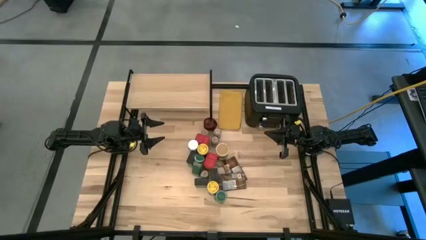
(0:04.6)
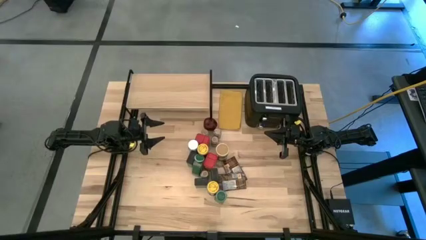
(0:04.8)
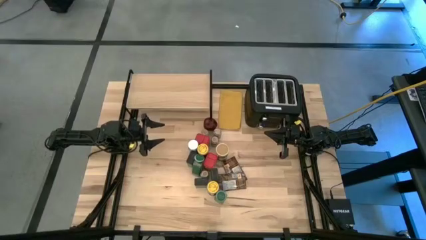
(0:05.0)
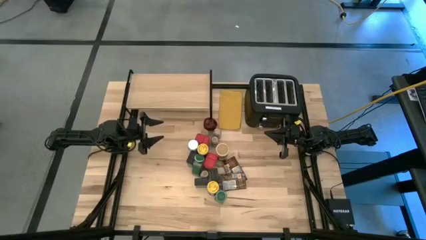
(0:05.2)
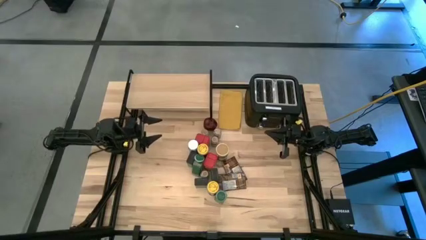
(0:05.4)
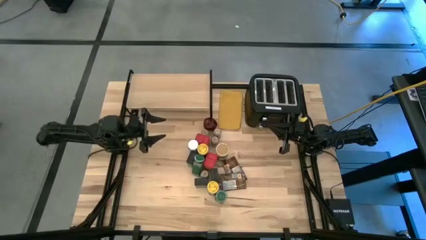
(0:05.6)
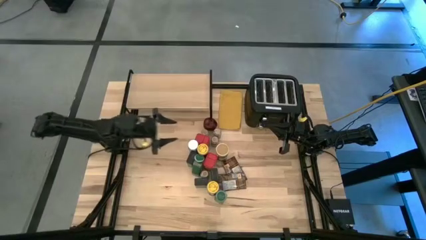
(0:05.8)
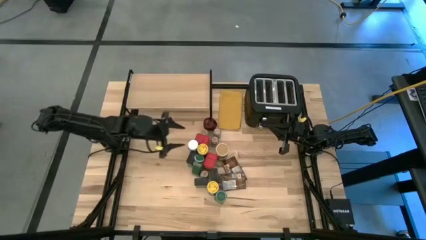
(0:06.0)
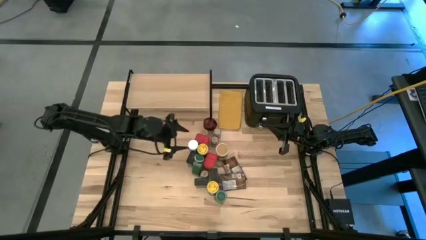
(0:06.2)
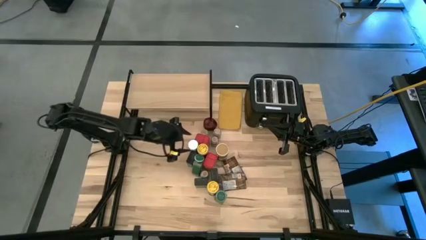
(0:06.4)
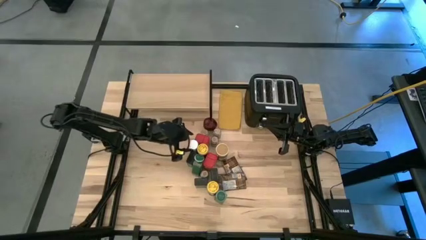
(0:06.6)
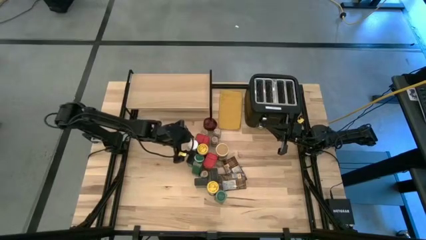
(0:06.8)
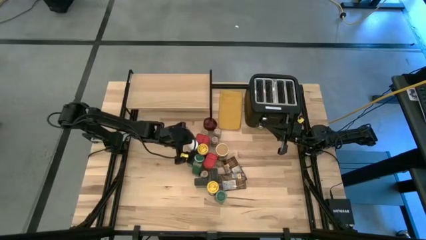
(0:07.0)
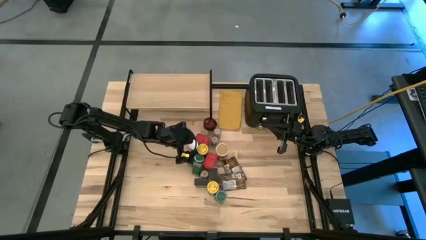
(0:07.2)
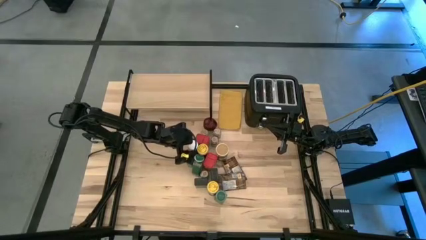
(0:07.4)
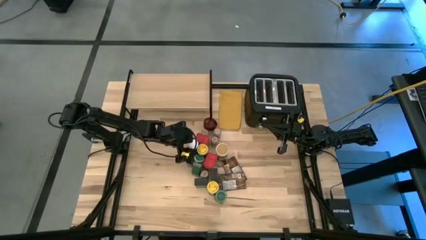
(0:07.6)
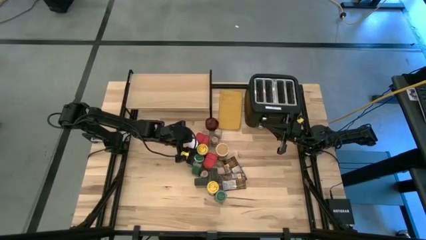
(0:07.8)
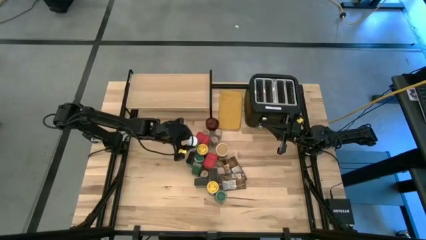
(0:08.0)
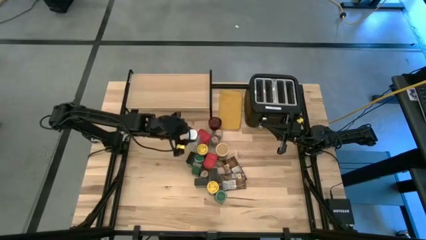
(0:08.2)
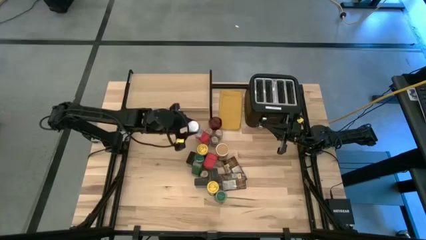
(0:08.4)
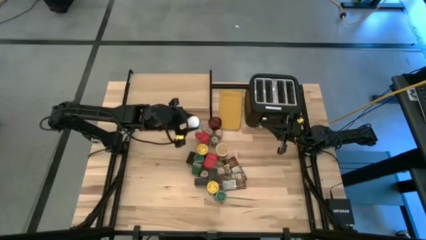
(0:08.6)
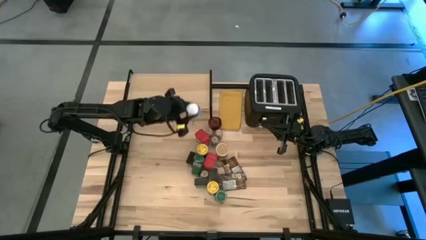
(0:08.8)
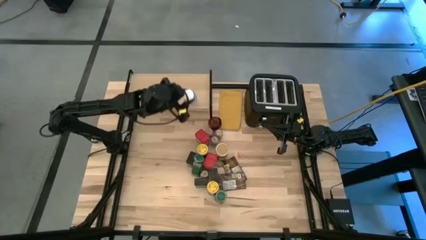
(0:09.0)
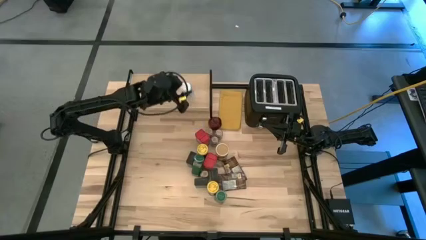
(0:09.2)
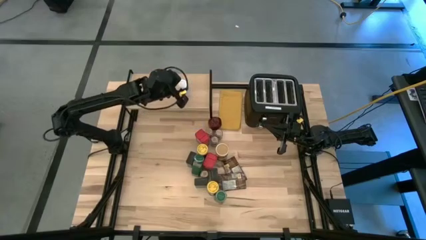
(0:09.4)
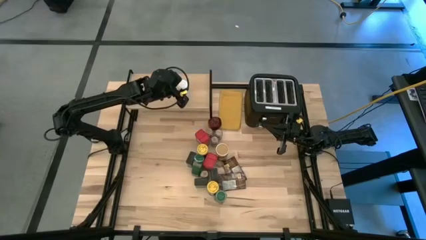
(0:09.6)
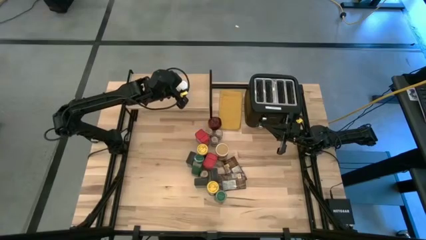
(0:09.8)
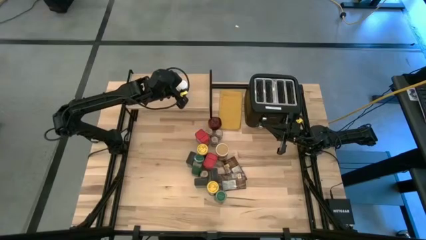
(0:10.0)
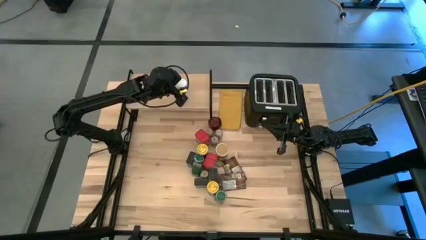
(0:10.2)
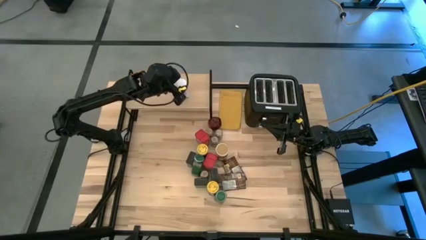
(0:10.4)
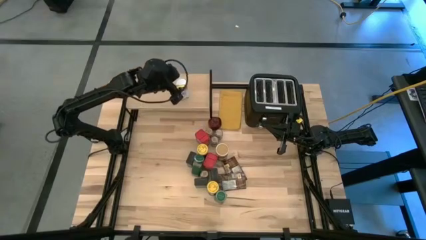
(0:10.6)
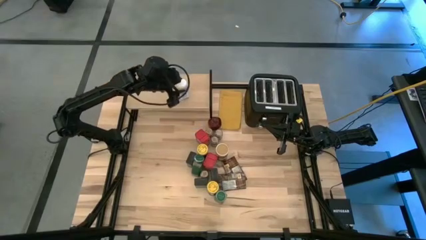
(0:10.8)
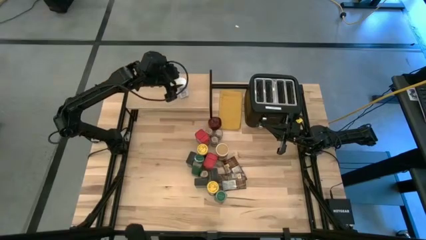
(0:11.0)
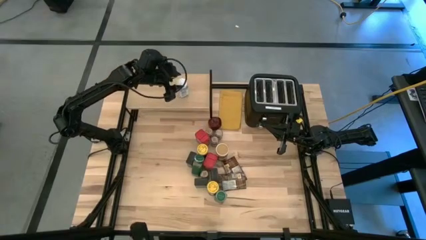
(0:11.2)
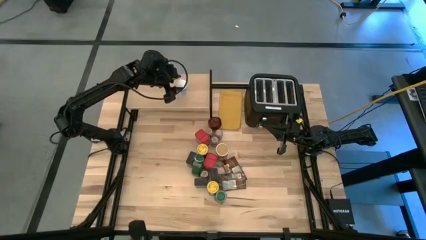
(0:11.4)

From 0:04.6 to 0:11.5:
Task: Shelf spices
Put the white seasoning bottle on the shelf

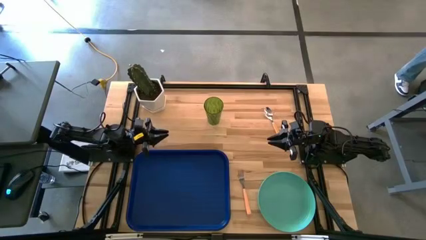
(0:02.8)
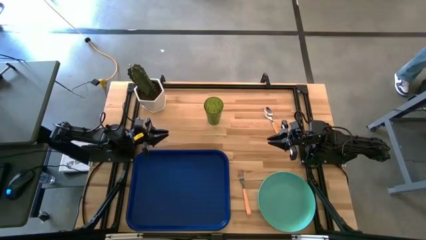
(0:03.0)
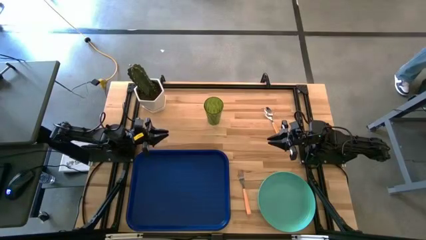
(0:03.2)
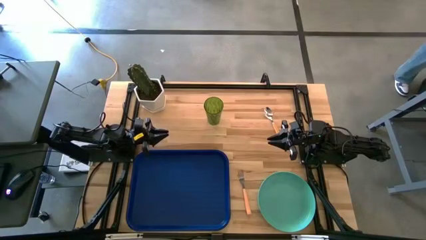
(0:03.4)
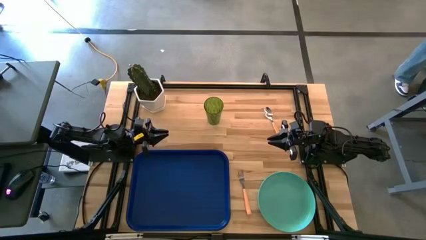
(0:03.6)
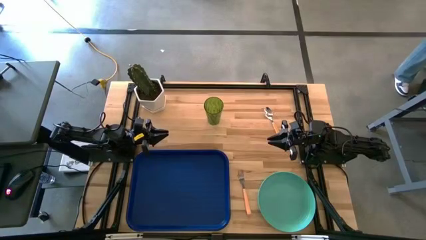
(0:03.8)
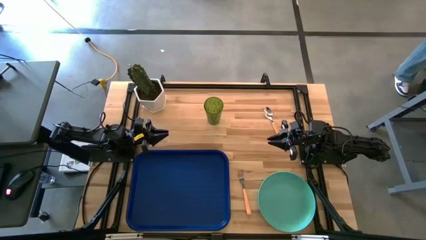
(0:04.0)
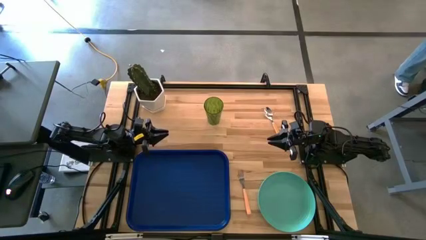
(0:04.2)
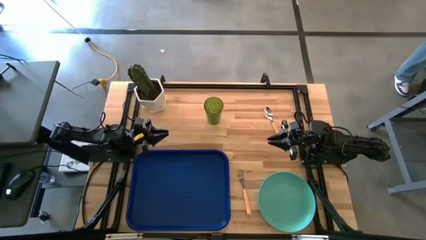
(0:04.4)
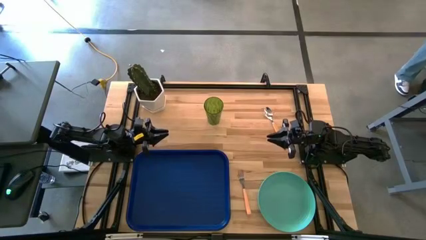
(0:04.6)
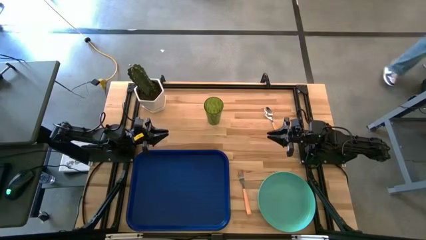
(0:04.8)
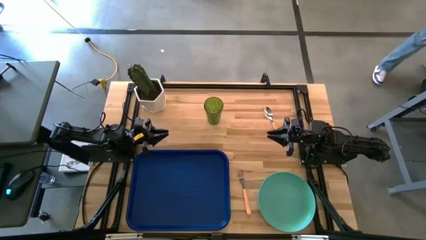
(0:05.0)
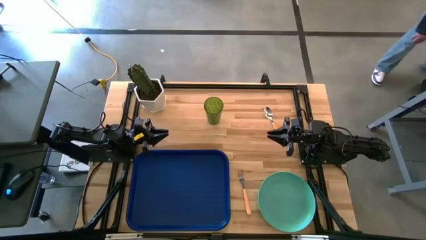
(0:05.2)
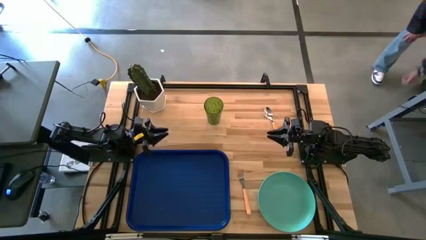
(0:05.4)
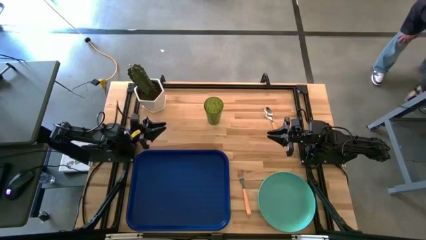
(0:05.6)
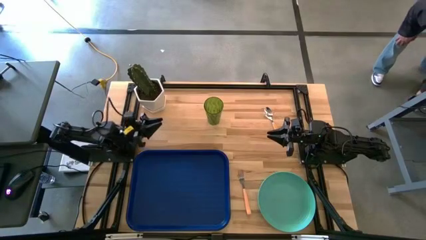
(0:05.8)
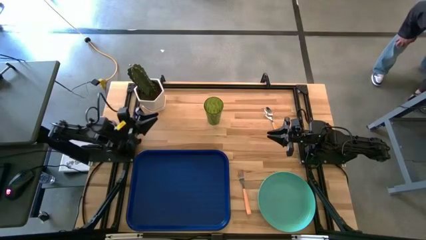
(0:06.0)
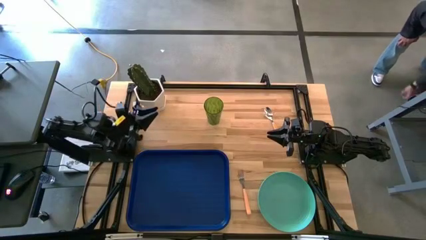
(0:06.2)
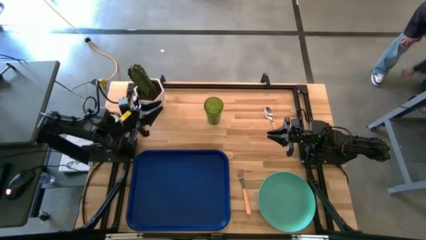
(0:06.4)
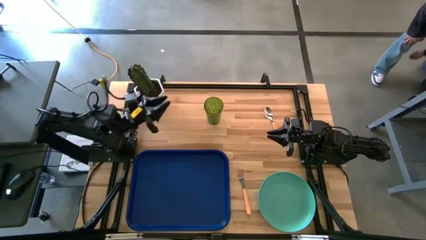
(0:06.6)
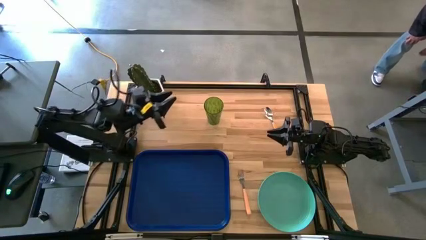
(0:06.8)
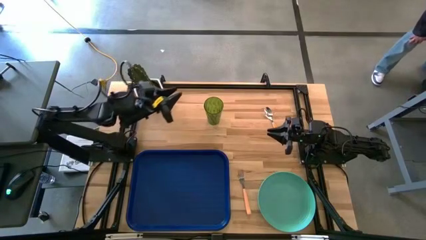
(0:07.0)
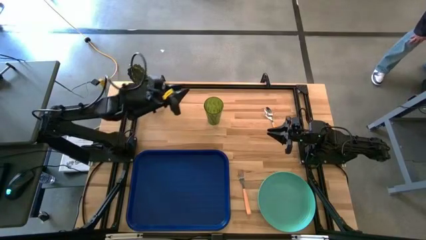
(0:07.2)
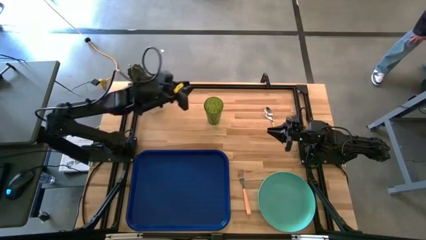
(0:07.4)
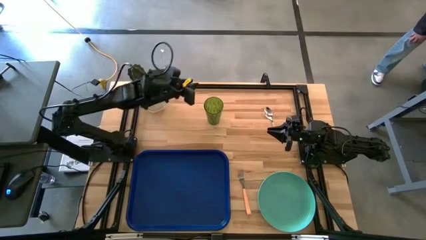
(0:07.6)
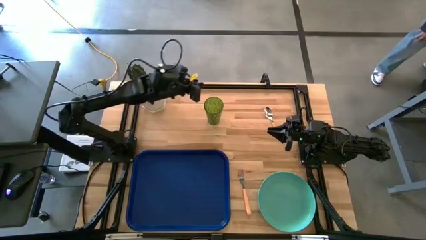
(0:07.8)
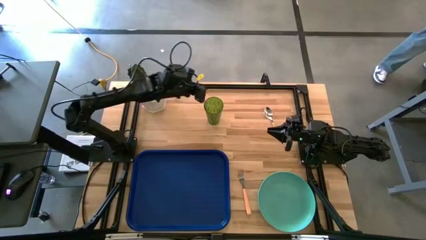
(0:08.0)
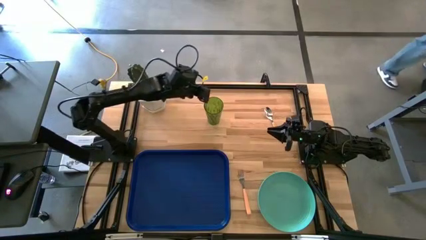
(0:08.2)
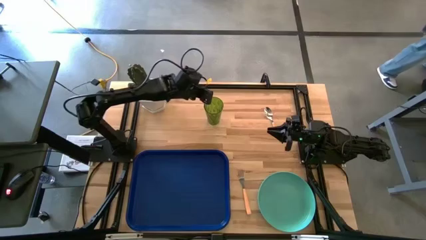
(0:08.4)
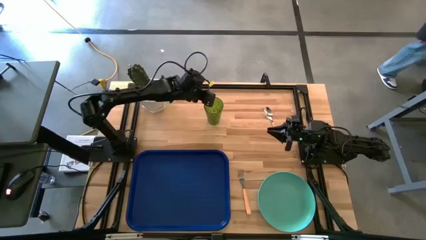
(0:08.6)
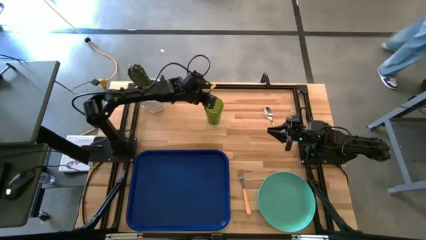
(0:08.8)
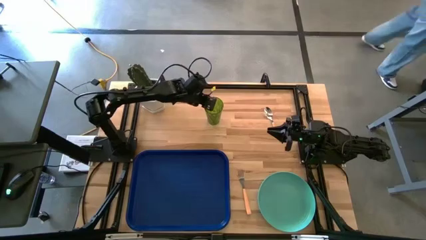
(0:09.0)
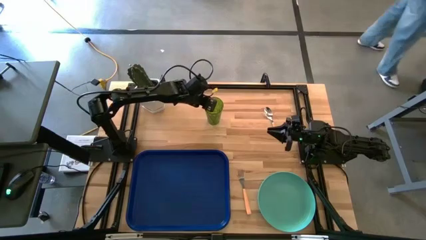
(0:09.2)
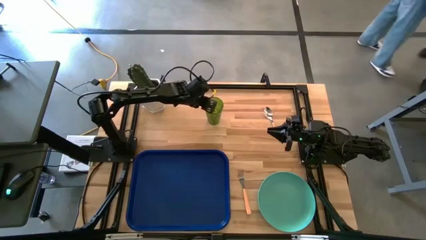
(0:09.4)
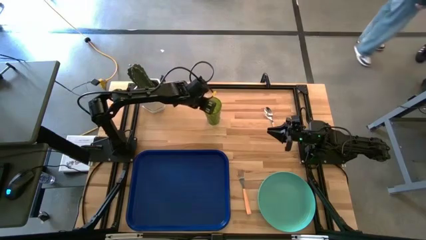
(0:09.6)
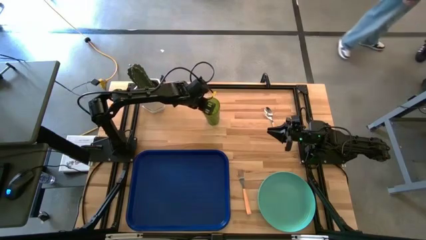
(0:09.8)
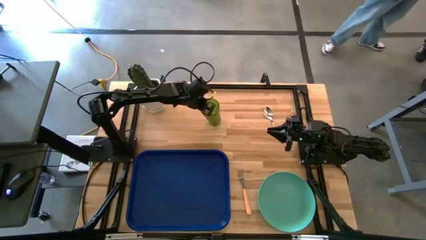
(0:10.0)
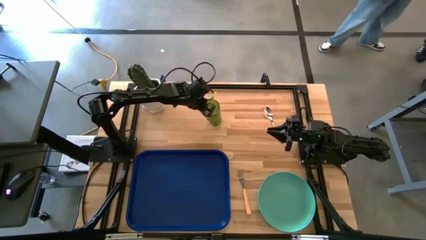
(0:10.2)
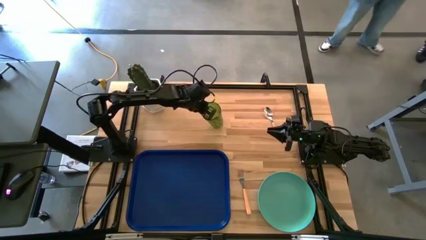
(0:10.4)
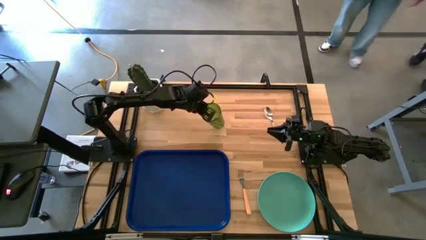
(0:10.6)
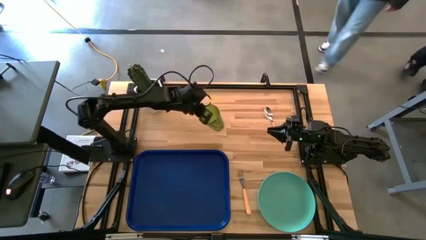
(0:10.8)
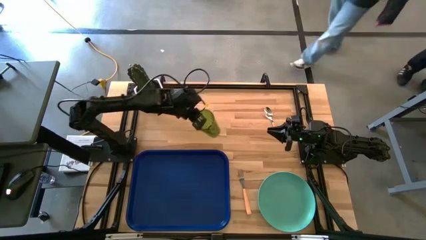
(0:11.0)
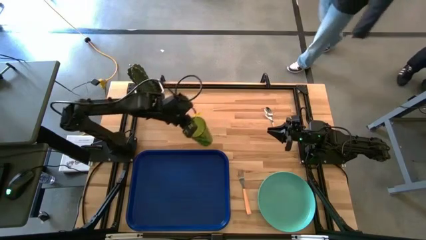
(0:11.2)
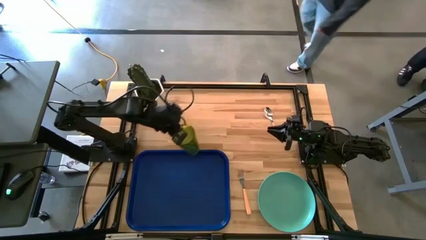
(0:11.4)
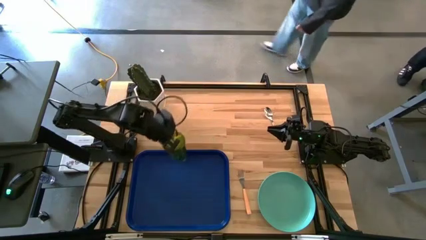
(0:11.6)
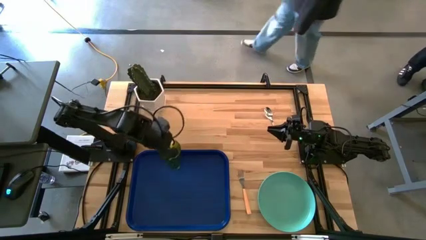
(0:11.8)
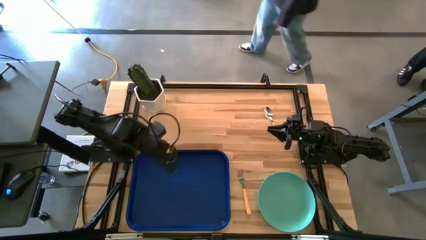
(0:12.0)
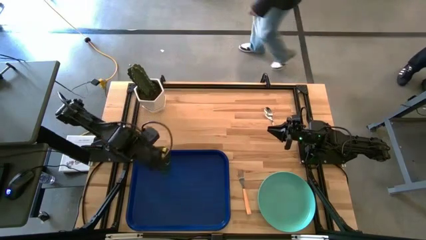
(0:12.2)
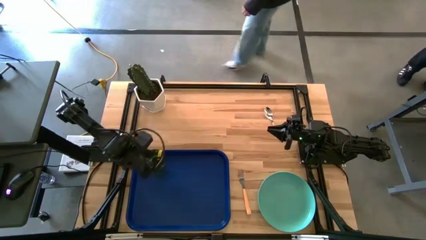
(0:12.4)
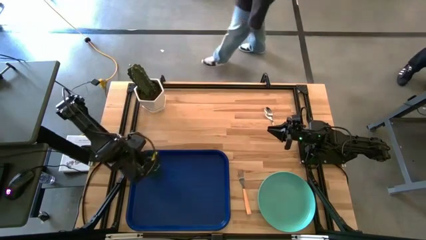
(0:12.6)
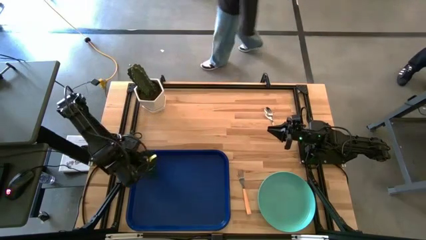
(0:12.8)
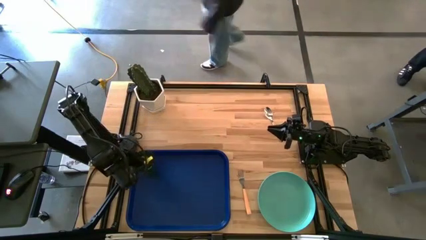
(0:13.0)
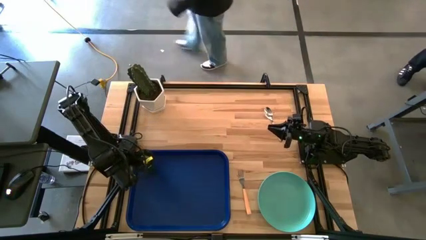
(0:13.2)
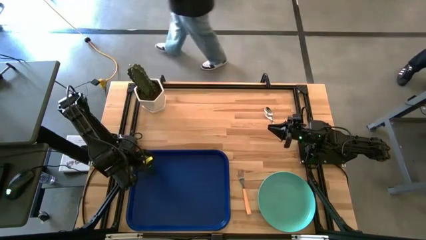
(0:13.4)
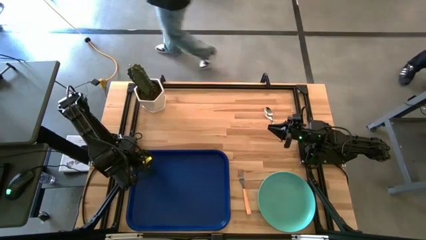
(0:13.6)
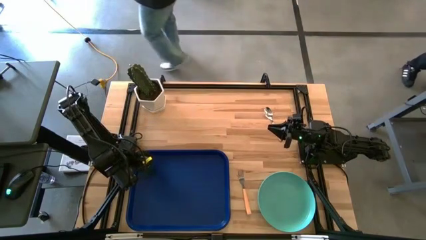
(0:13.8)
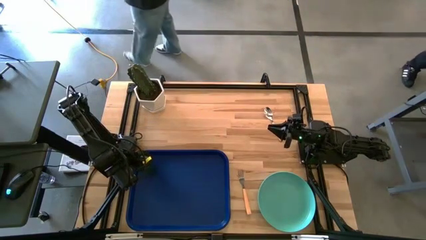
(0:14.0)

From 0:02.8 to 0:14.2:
Task: Pick and place plate/cup/fork/spoon on tray
Put the green cup on the blue tray
